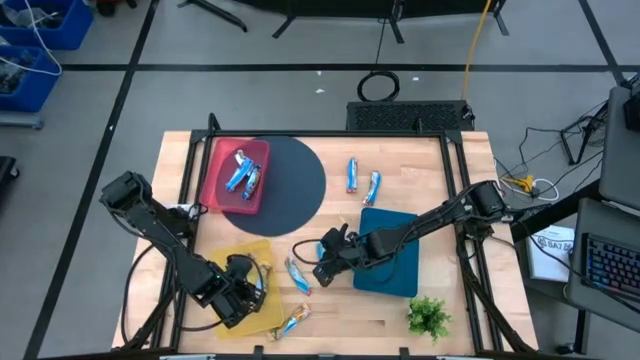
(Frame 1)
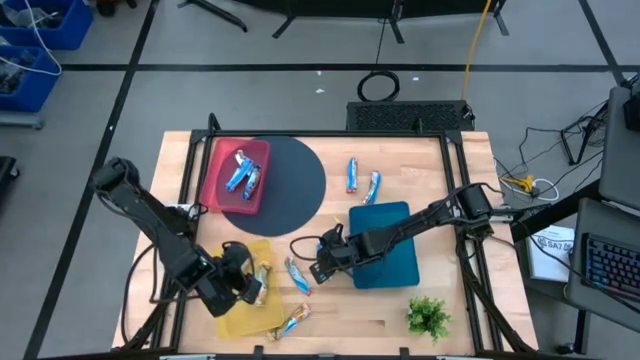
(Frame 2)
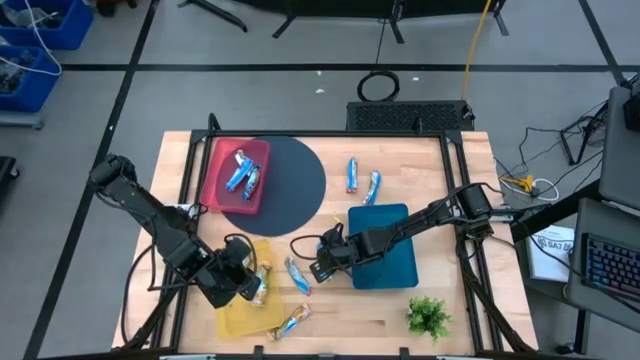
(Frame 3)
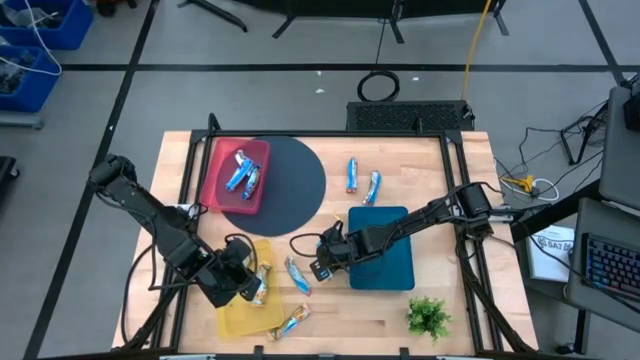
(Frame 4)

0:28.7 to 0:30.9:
Task: Pick and place Granola Bars by type
Put the yellow granola bar into the yellow bin

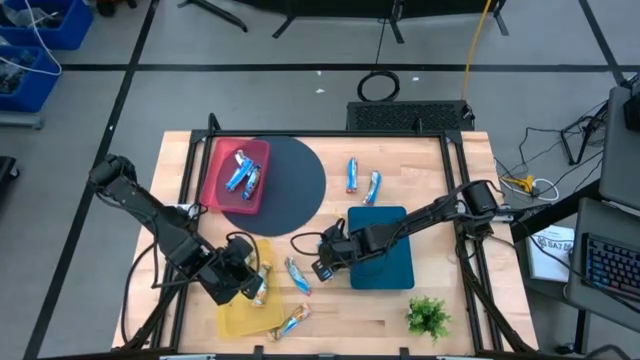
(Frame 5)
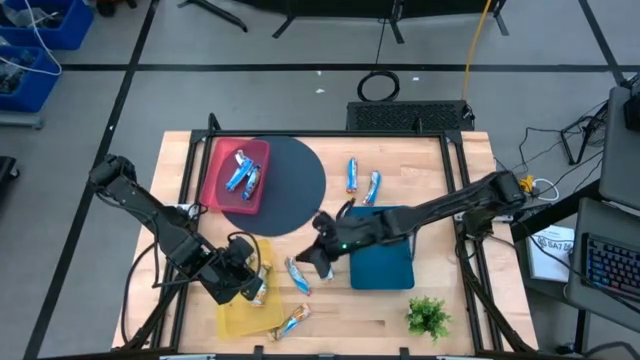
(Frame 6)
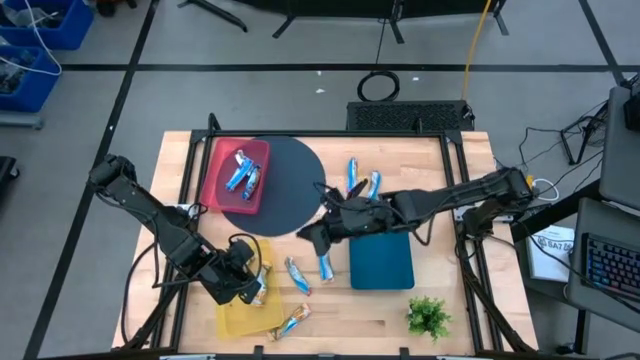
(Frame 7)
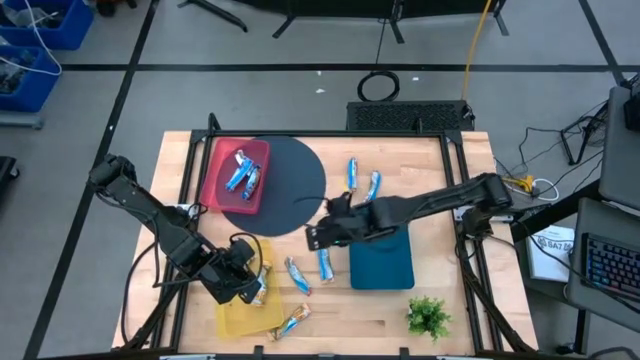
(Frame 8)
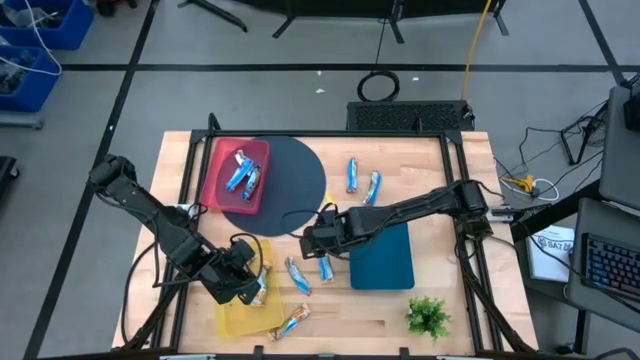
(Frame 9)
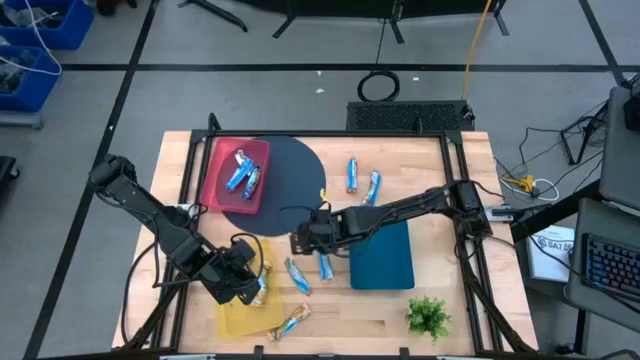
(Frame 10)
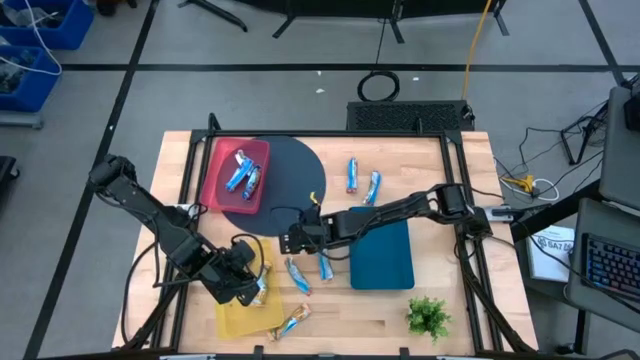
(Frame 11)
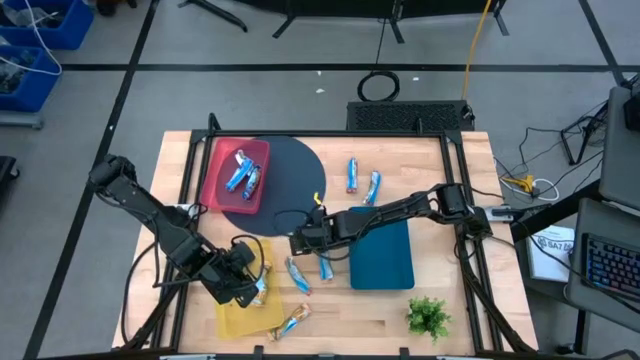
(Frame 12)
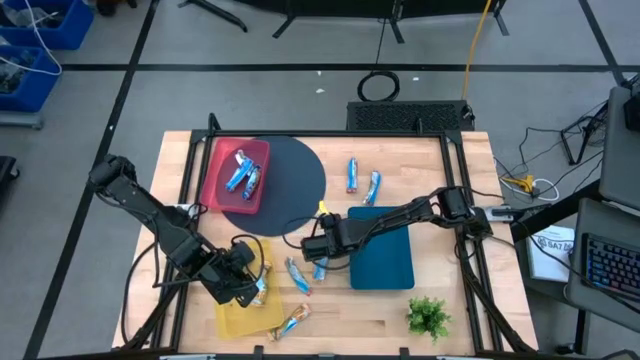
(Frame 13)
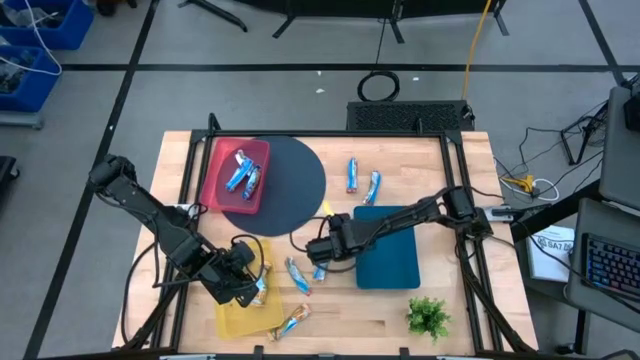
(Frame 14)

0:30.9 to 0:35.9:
Adjust the blue bin on the table

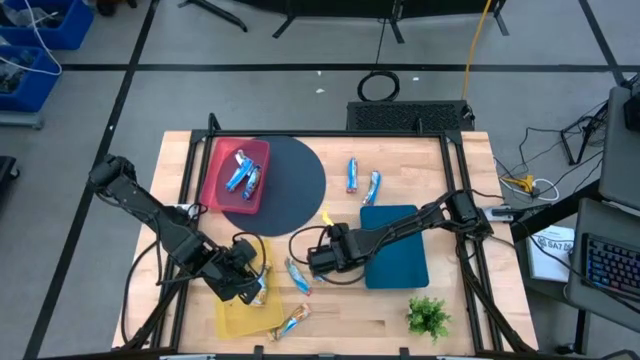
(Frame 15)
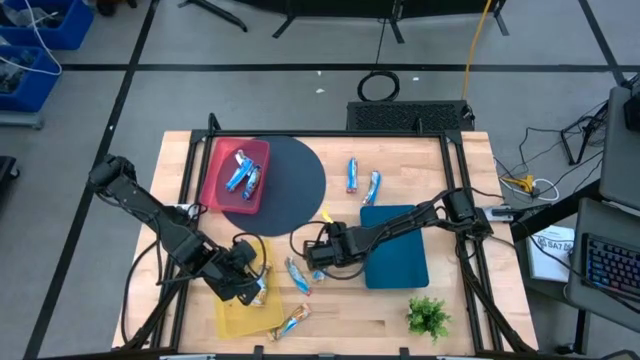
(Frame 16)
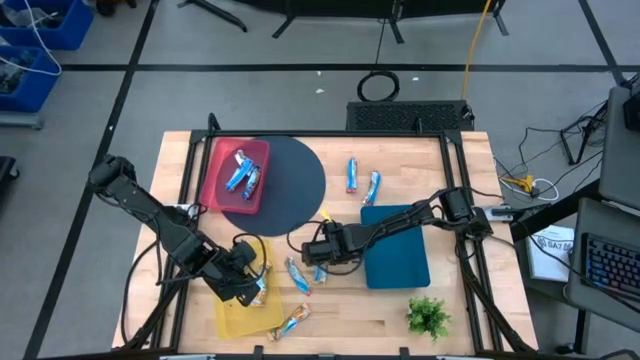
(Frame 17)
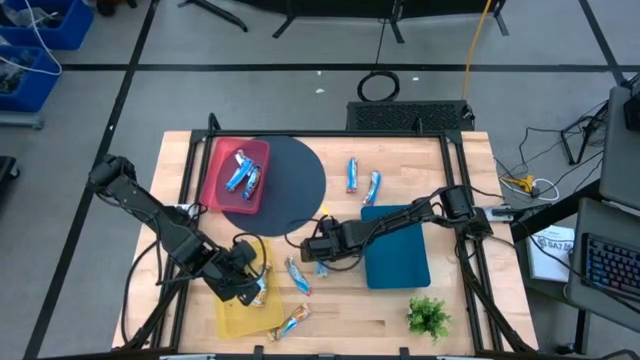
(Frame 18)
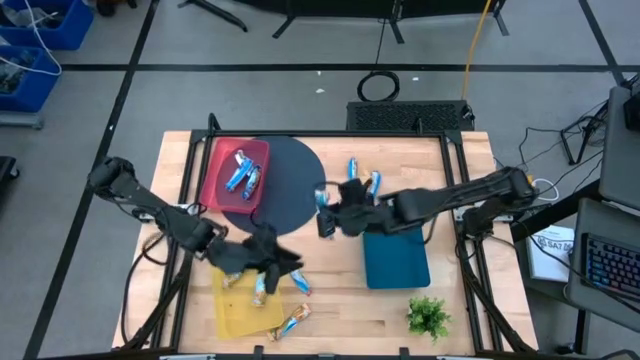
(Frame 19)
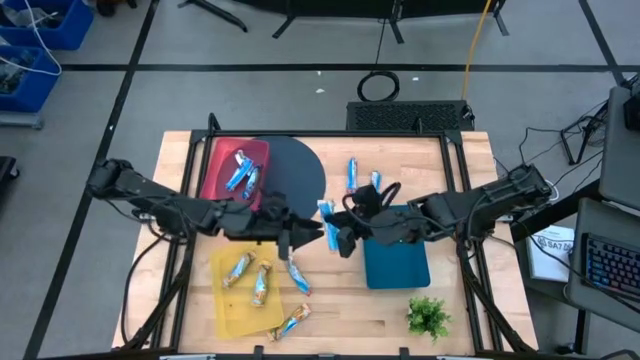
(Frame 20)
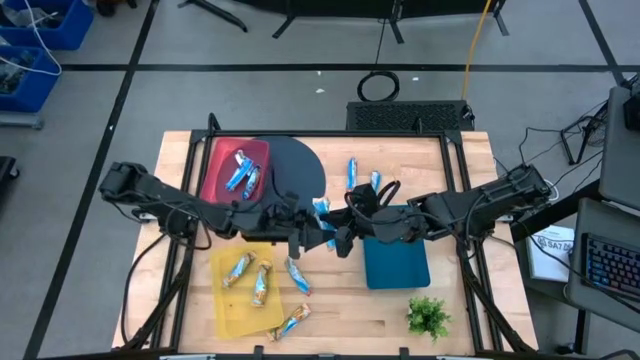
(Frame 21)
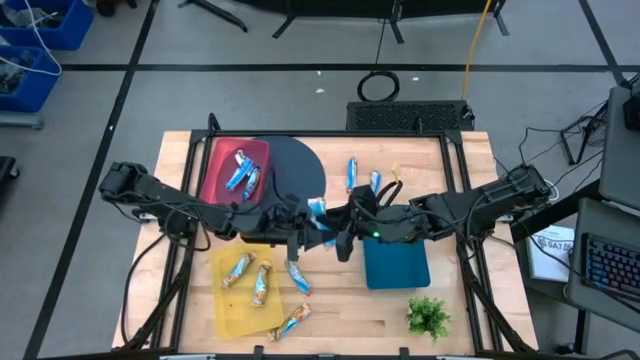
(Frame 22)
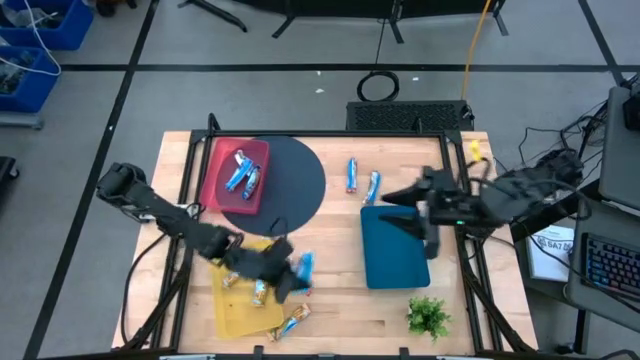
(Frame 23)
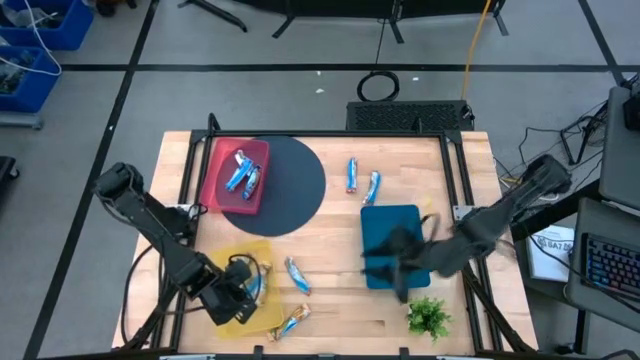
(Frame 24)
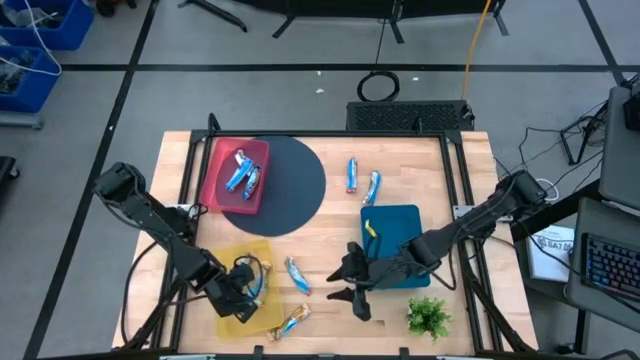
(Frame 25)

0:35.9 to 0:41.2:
Put the top yellow granola bar into the yellow bin

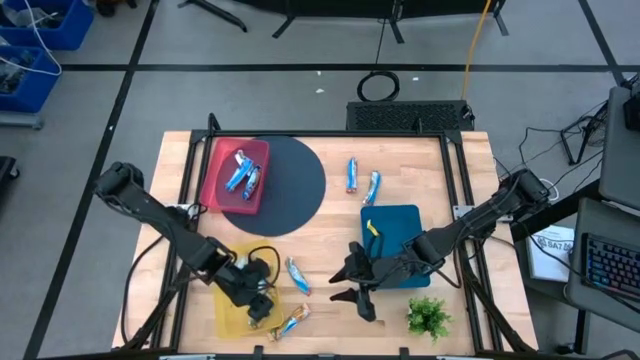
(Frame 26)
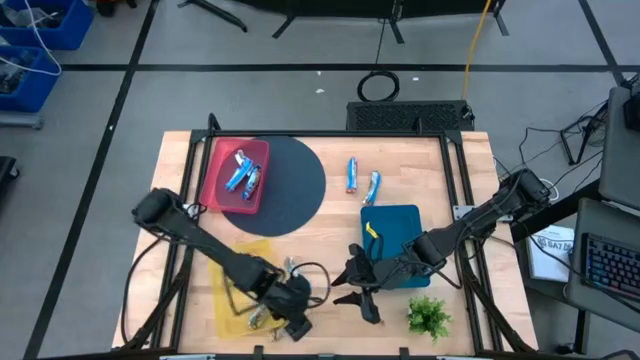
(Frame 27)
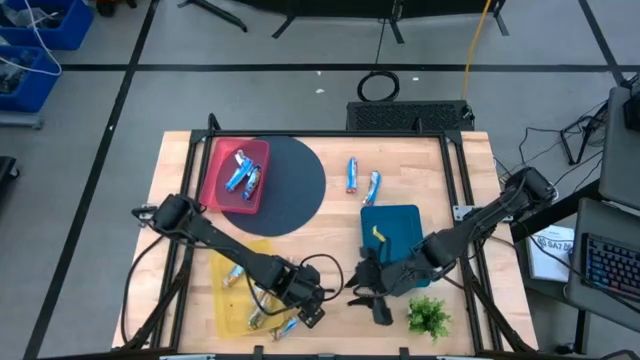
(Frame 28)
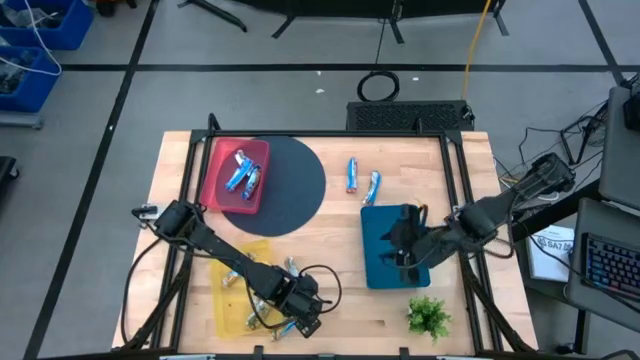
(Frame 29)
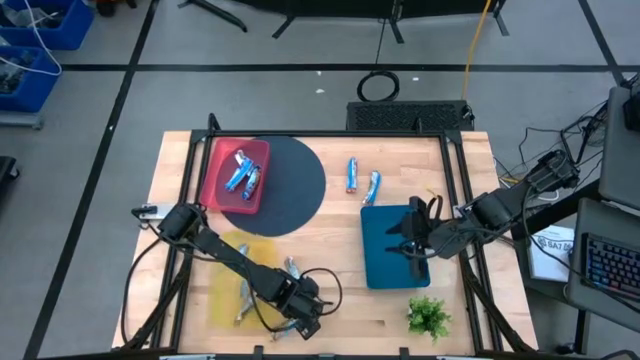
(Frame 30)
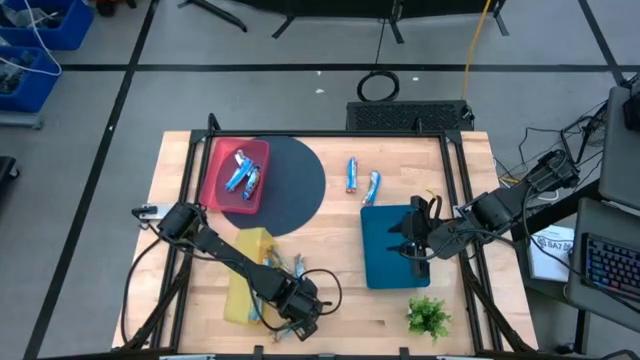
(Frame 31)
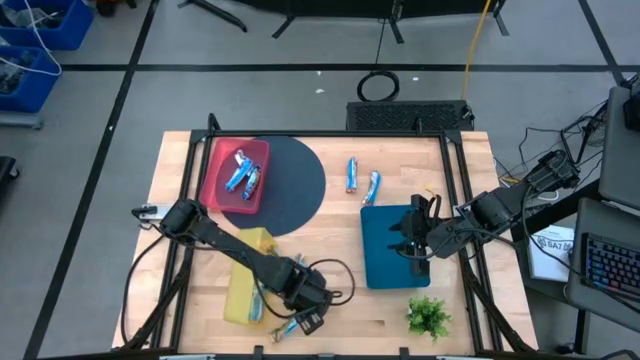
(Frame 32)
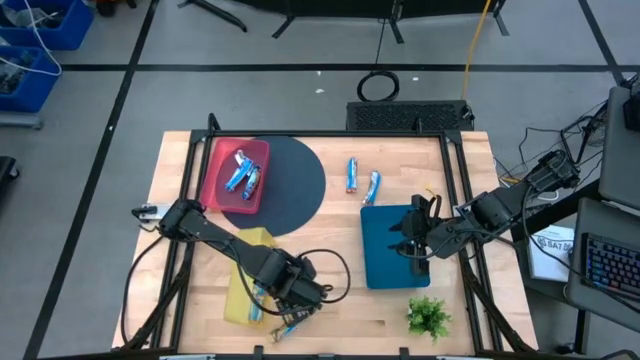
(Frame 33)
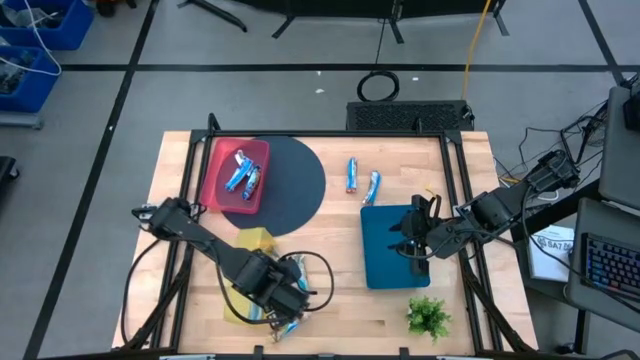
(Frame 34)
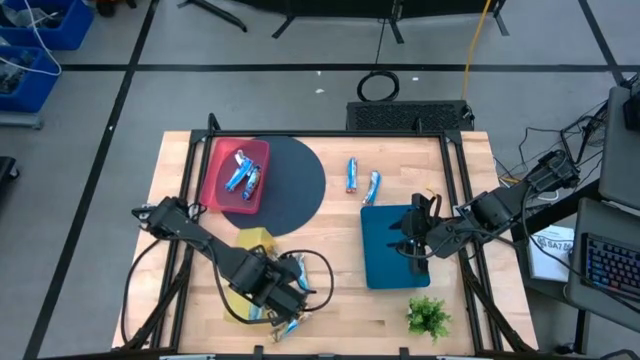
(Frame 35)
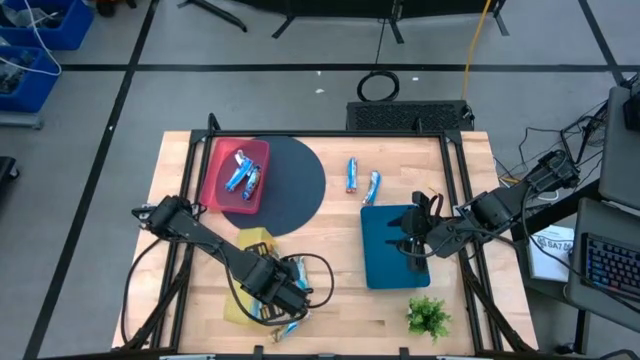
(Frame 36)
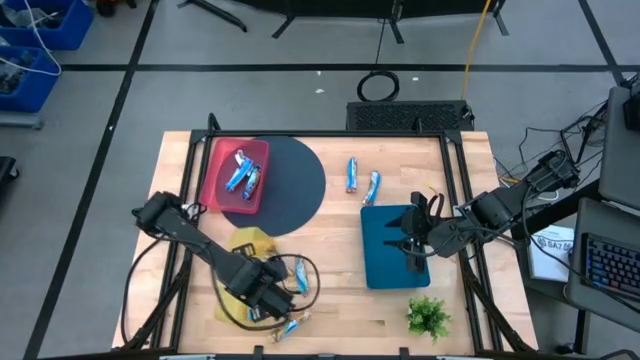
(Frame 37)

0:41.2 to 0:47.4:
Adjust the yellow bin on the table

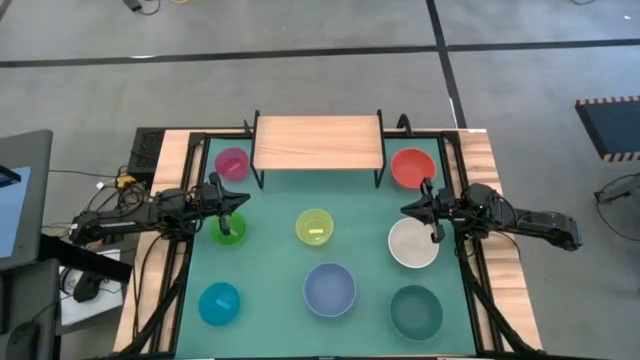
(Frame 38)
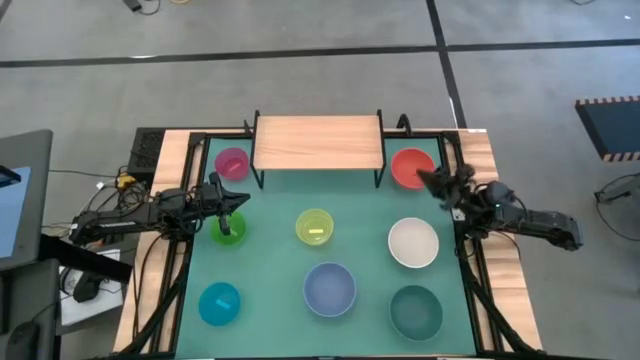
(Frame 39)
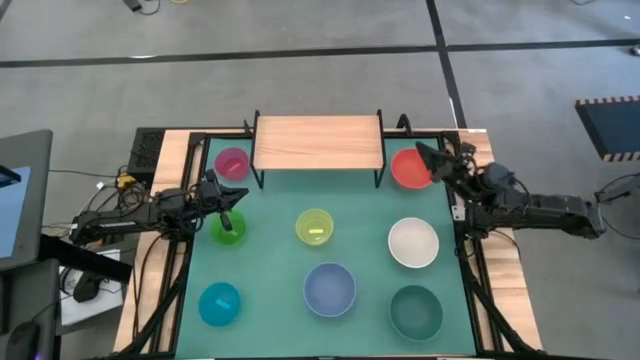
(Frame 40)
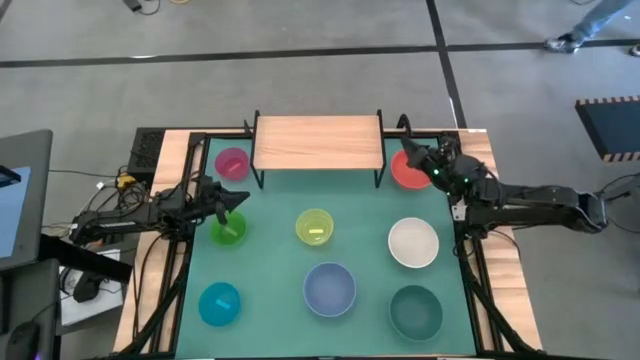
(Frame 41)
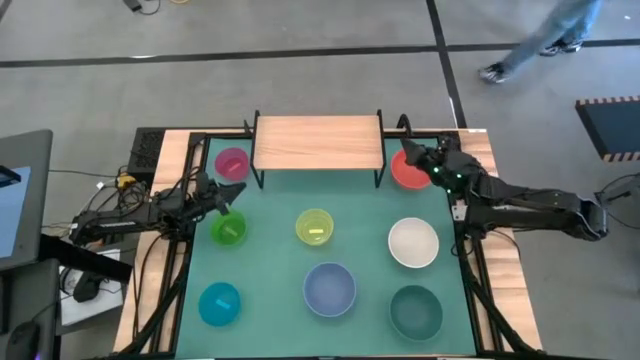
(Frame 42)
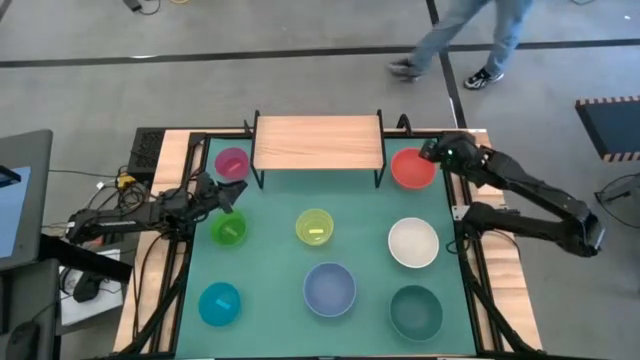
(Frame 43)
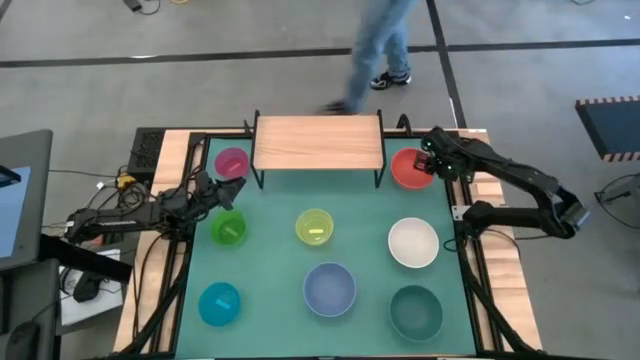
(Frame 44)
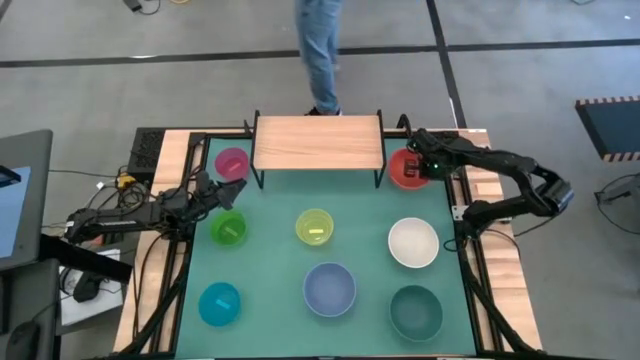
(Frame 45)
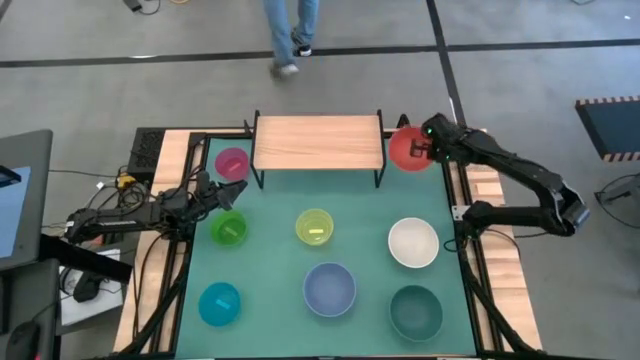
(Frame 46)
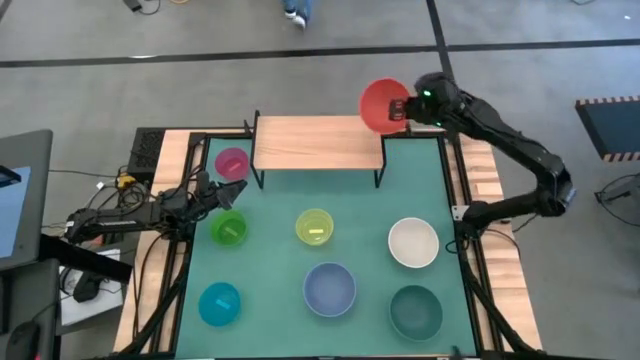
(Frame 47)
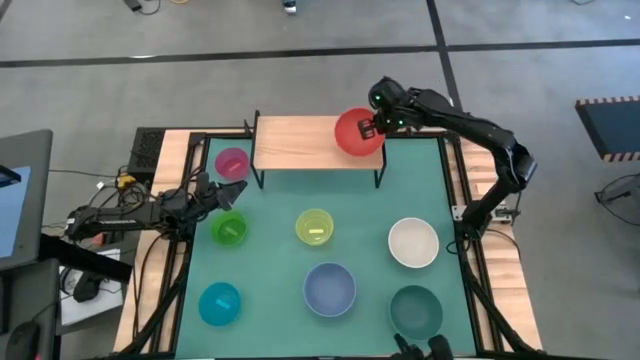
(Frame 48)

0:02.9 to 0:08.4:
Task: Place and stack bowls onto a shelf
Put the orange bowl on the shelf
